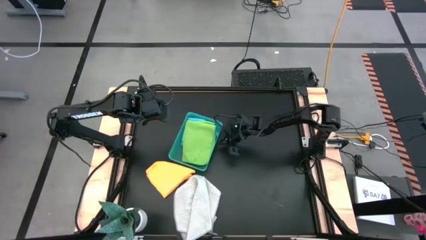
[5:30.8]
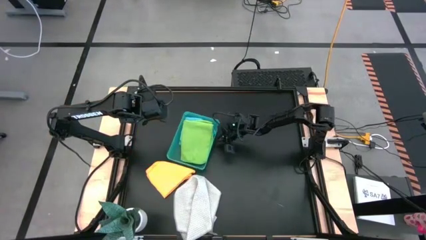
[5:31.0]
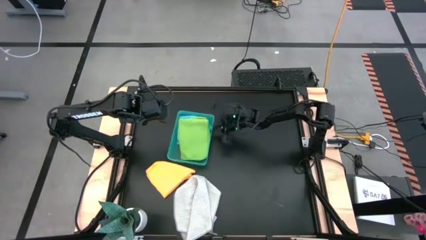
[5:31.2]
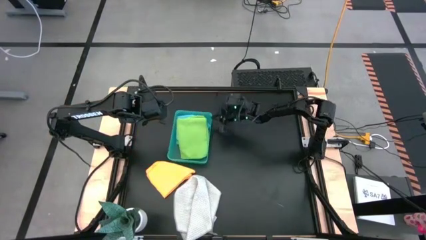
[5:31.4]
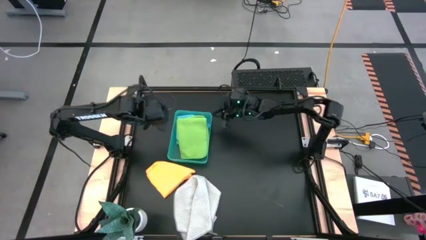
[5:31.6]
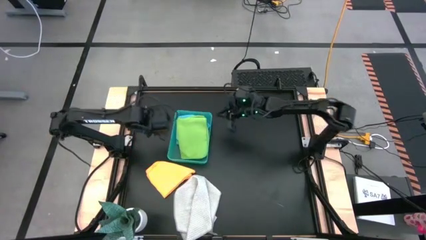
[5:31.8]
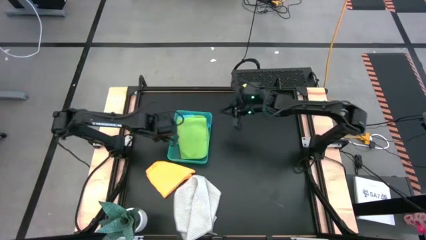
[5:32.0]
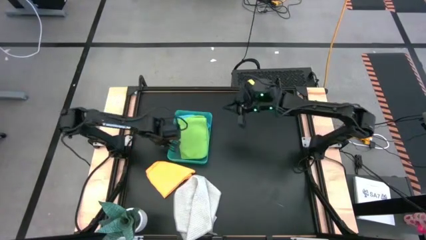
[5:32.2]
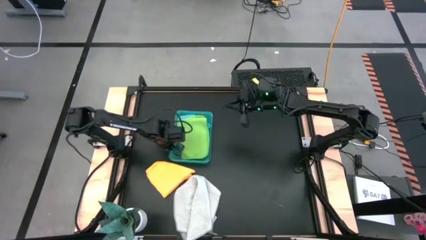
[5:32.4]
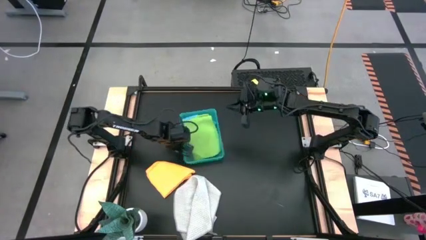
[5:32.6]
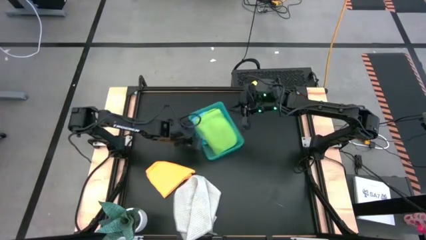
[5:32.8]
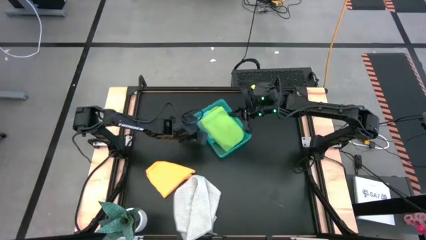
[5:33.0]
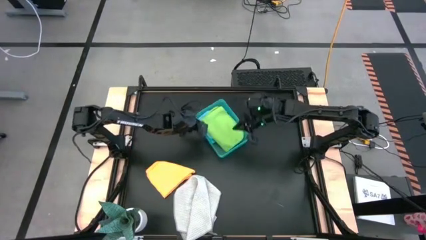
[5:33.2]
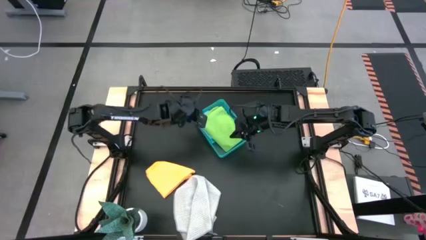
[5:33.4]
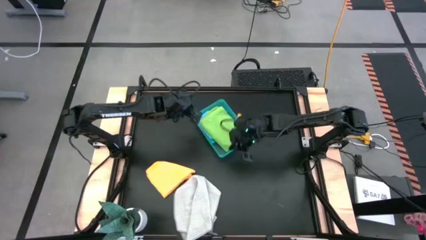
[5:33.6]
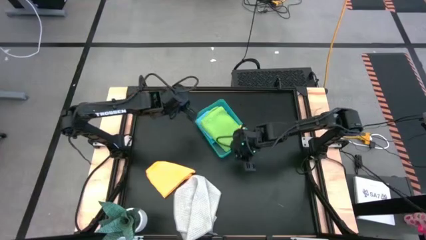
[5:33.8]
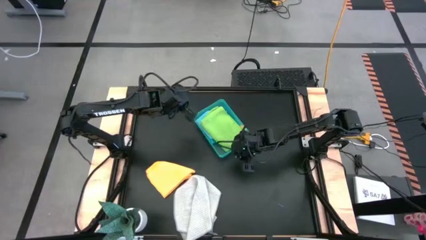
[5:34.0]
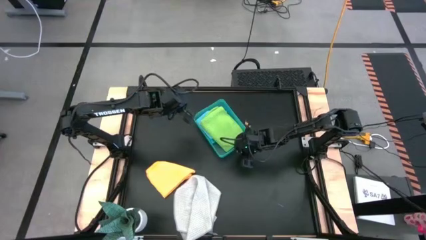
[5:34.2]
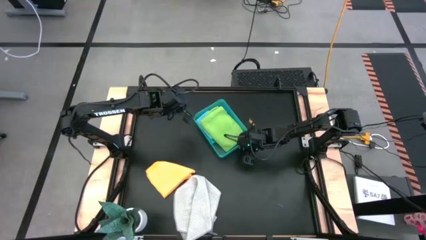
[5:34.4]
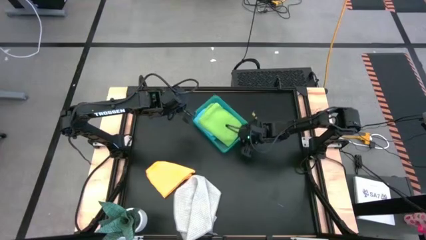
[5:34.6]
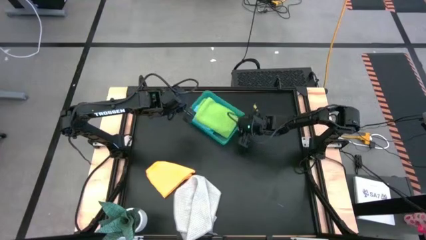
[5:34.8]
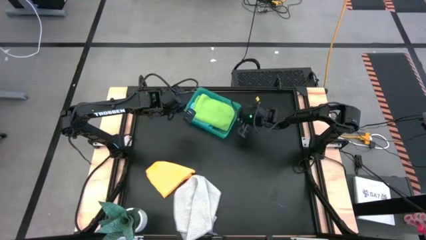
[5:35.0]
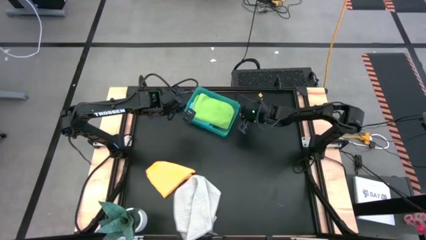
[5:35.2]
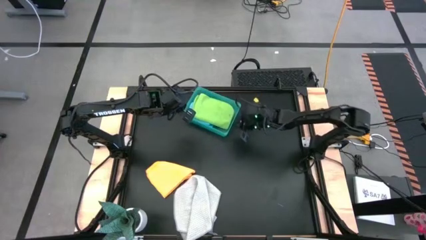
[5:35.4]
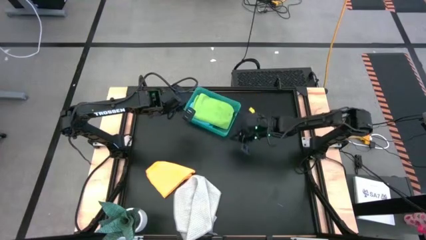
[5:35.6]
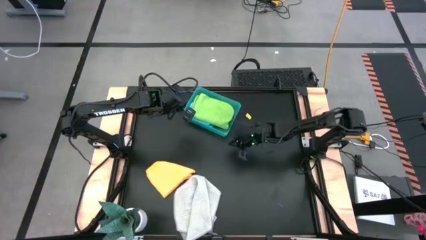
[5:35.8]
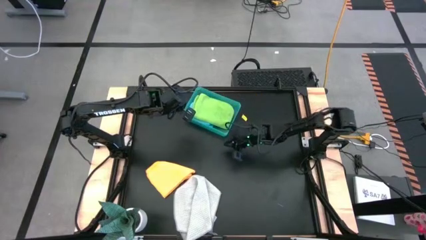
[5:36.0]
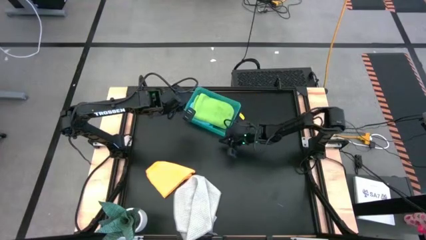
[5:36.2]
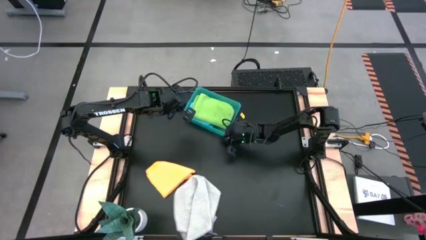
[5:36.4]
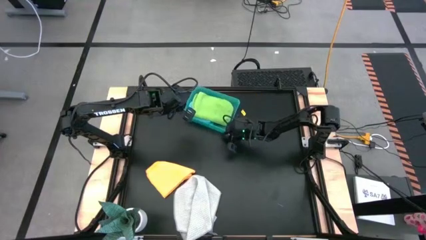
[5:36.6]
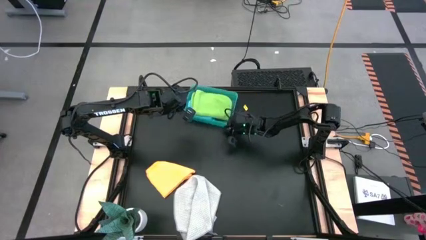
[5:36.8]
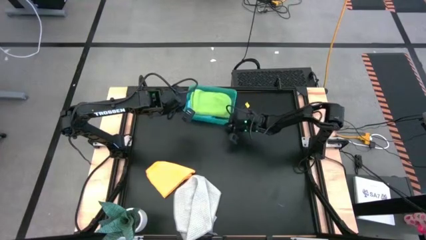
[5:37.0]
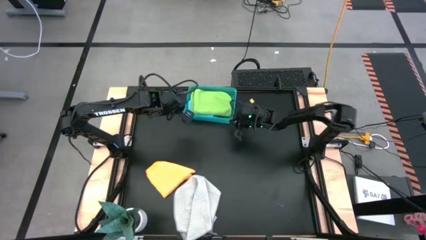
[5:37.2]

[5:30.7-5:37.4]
Task: Fold microfiber towels
Move the bin to the top center of the table

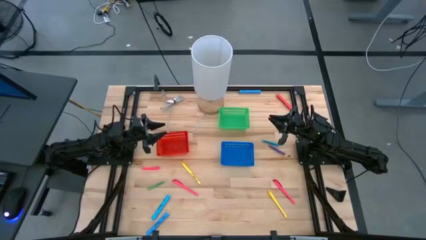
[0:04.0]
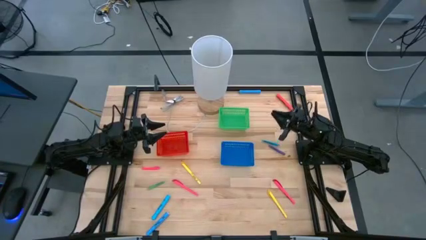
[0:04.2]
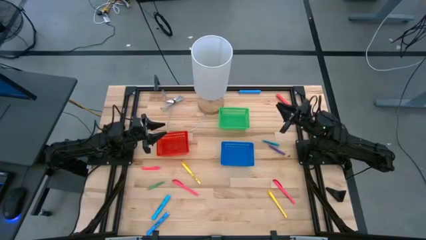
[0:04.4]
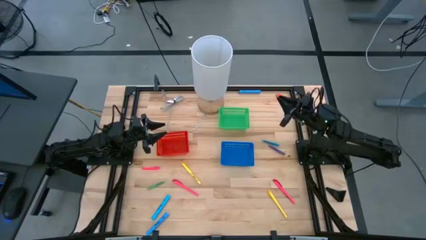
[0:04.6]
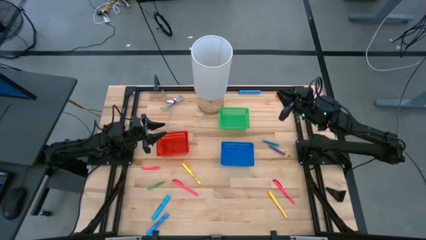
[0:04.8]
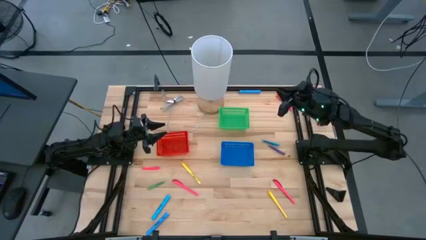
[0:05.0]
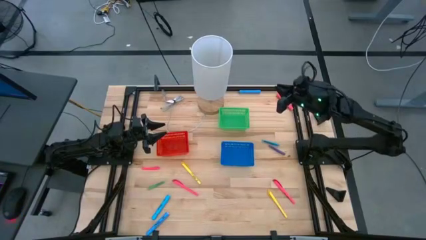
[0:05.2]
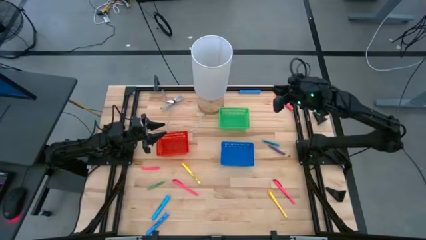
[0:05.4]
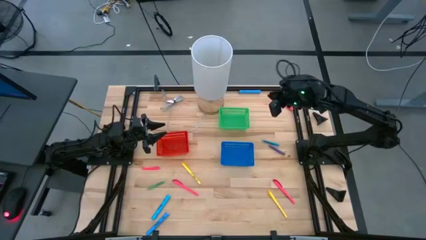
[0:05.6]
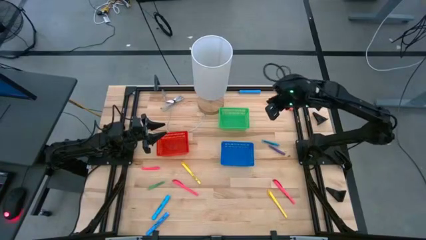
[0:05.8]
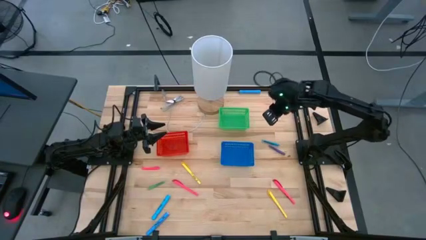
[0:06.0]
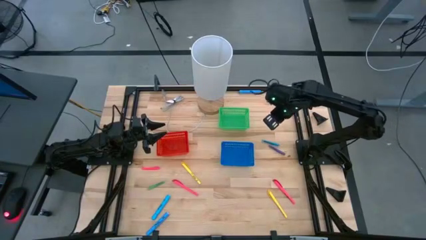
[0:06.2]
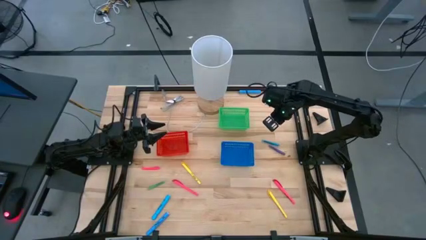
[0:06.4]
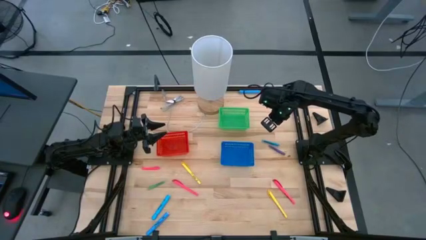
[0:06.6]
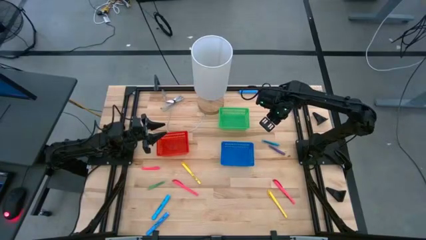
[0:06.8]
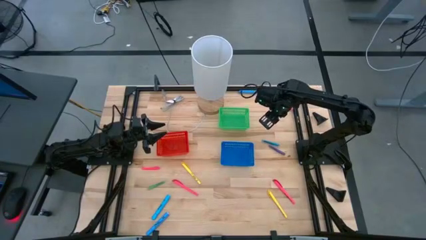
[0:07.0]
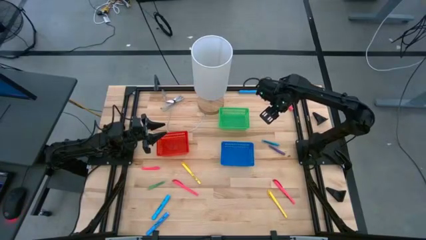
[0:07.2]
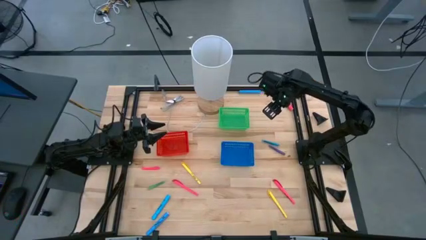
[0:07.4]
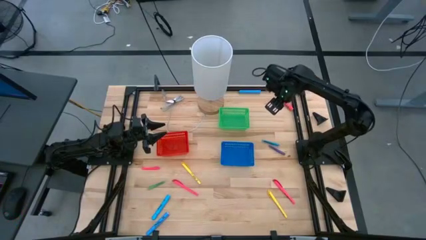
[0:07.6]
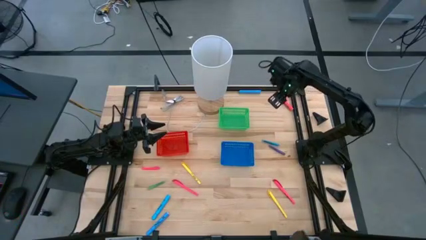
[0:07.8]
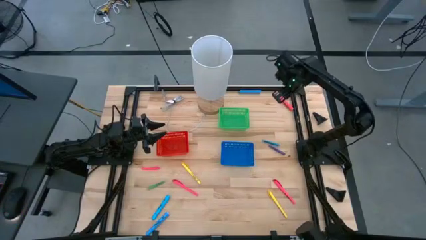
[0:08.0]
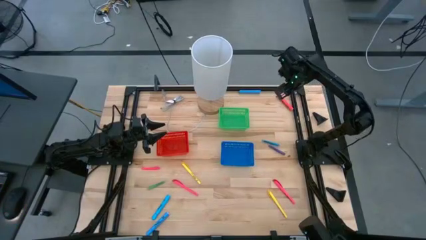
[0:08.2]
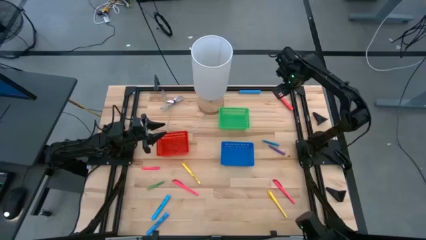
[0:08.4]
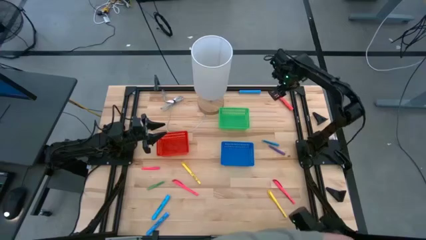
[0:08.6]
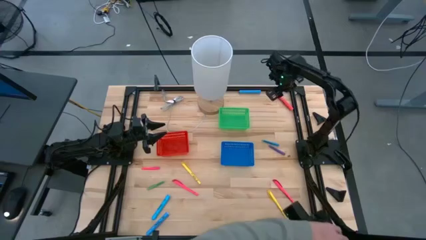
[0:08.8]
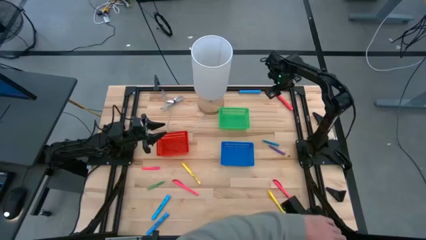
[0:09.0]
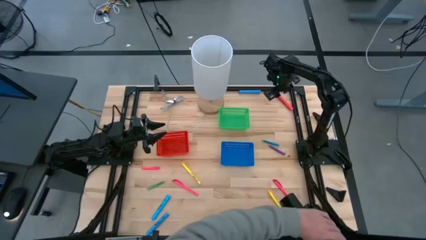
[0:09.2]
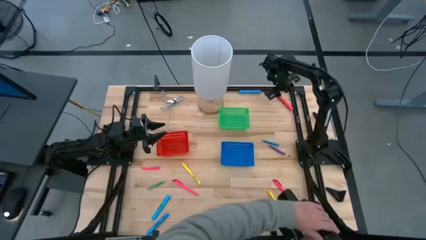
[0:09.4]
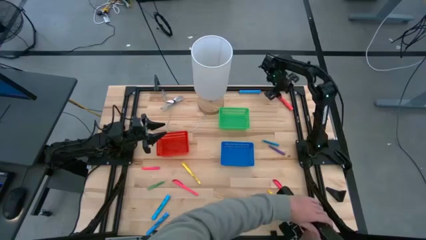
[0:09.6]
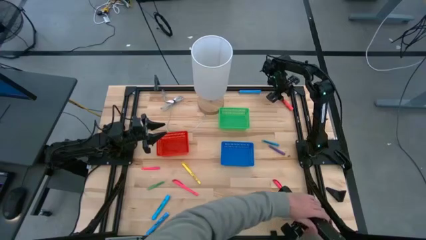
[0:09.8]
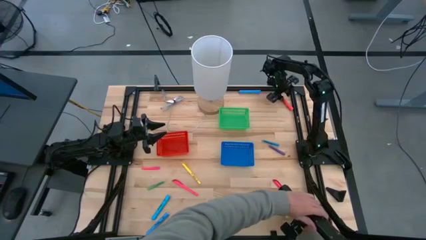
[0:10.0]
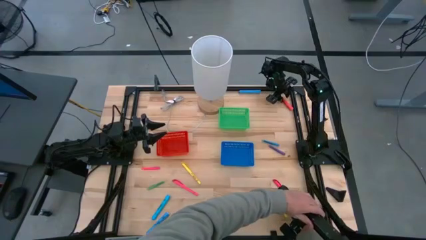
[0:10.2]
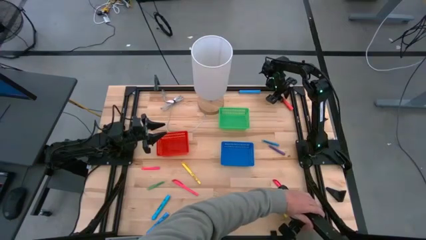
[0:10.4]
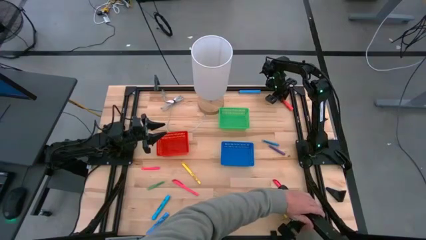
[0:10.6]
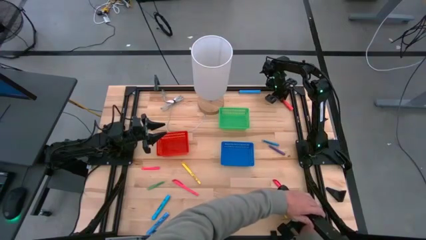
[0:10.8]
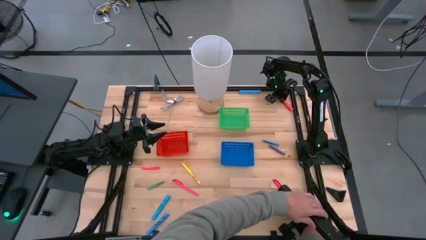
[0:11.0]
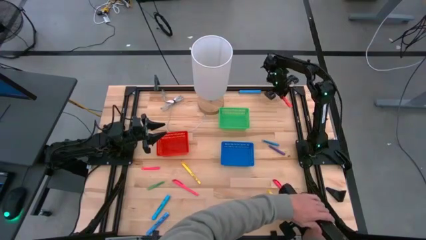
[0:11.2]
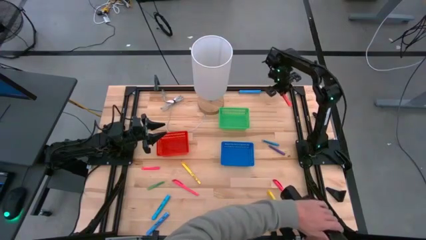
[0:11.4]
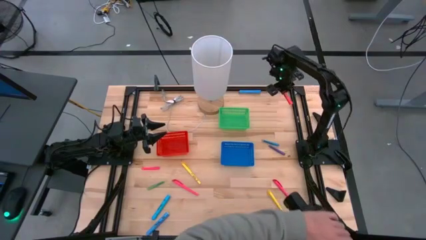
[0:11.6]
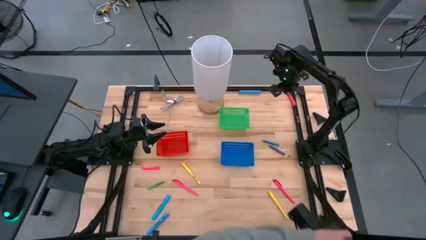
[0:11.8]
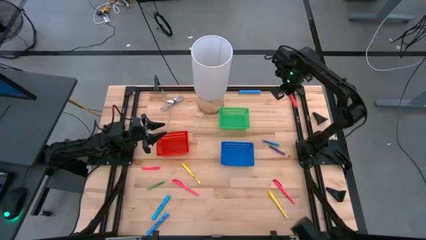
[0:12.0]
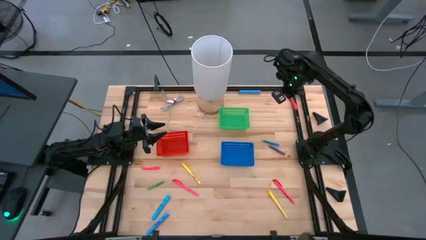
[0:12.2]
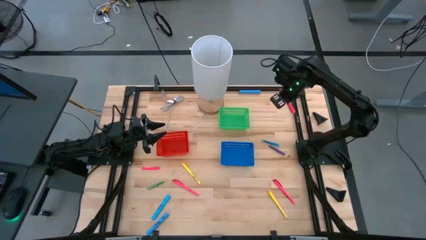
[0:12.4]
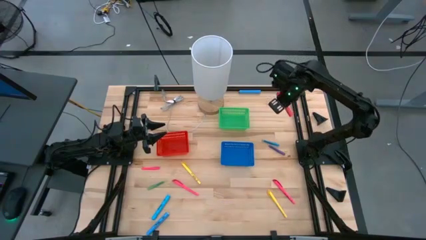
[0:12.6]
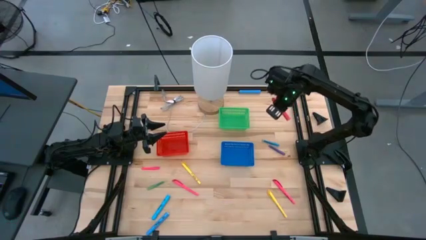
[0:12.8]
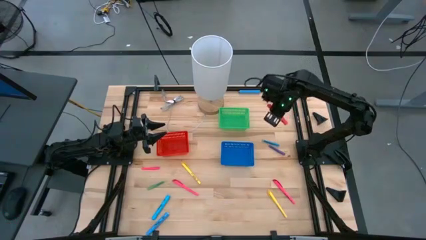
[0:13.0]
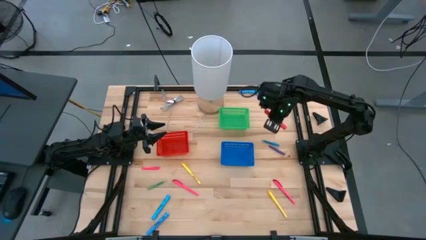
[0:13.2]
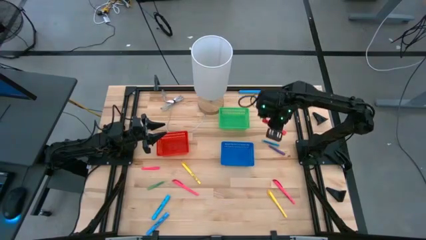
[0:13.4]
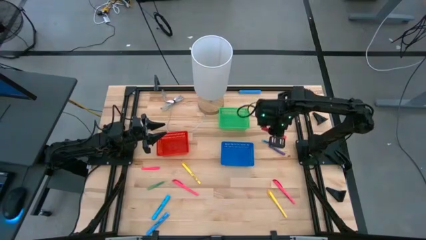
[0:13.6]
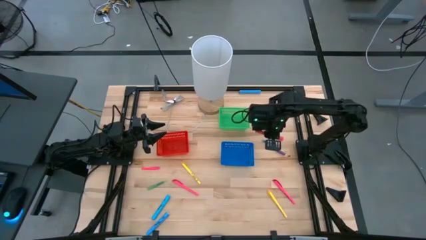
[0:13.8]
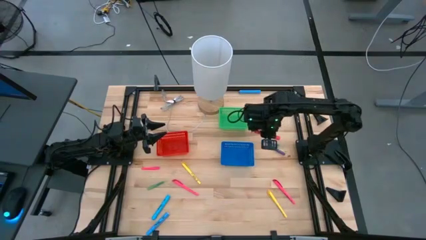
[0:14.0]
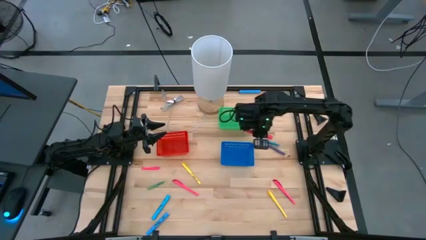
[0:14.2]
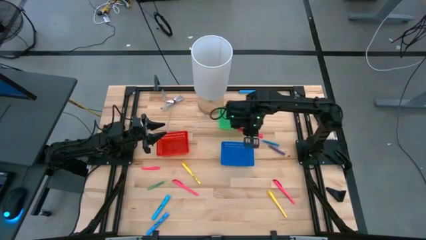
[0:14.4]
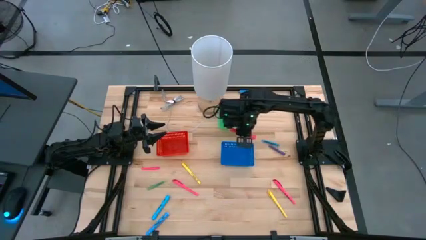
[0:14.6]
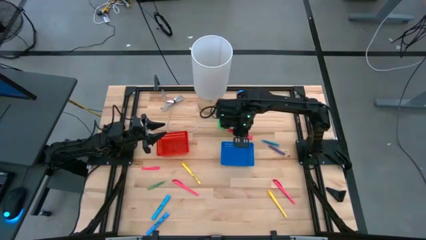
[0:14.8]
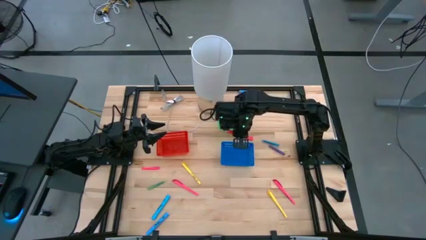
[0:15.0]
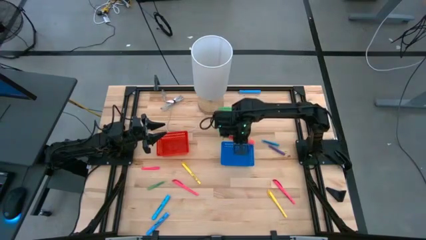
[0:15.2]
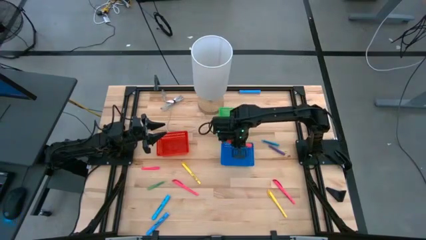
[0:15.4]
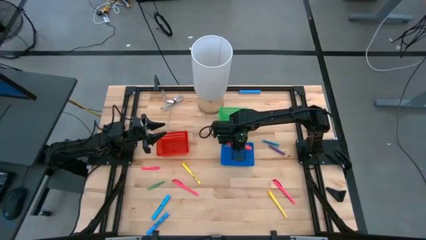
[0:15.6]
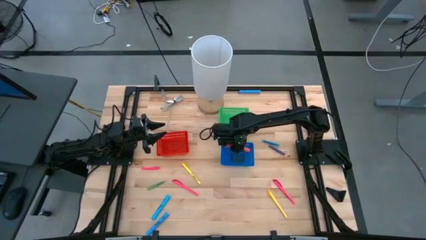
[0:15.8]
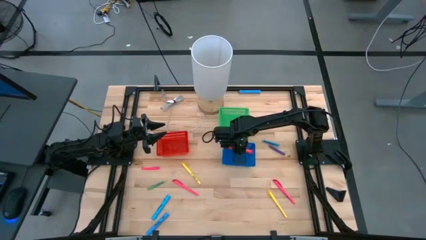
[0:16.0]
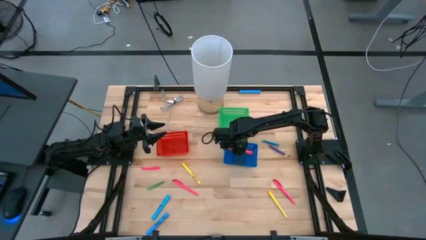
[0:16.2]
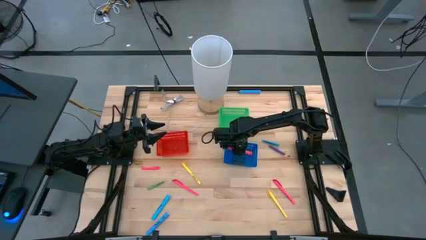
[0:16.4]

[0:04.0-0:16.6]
Task: Pick & Place Markers
Put the pink highlighter into the blue bin
